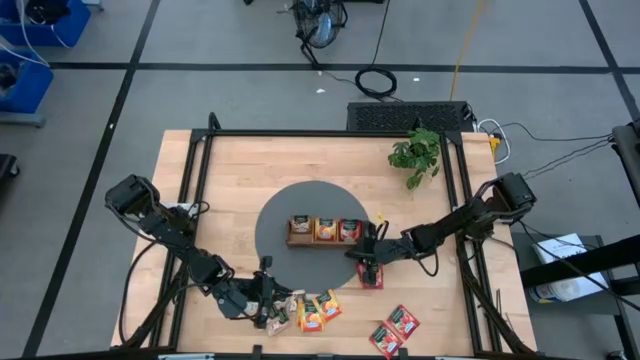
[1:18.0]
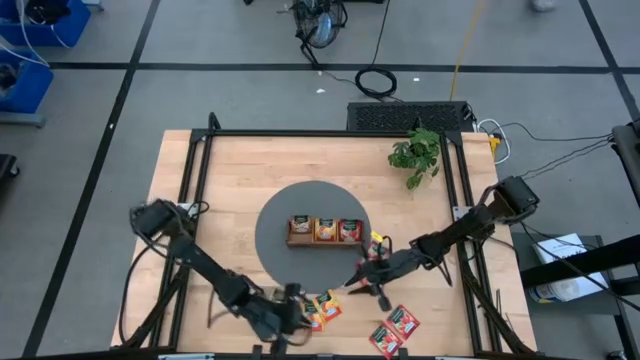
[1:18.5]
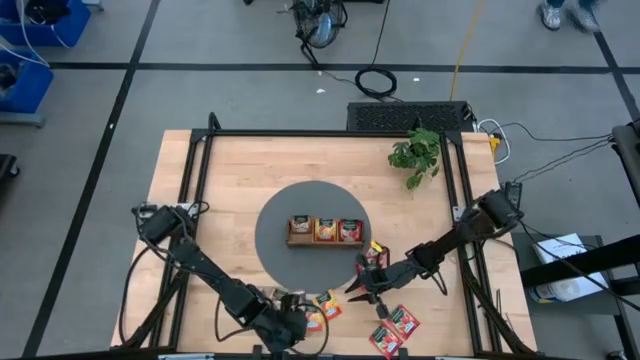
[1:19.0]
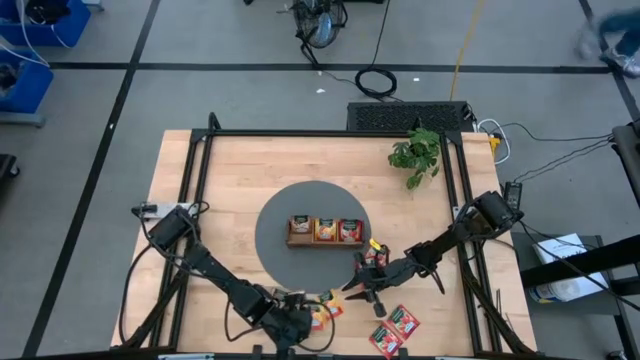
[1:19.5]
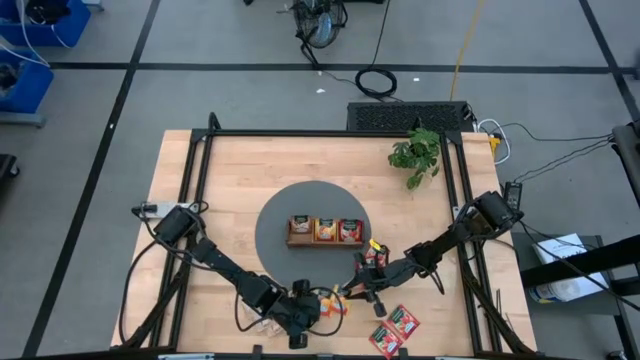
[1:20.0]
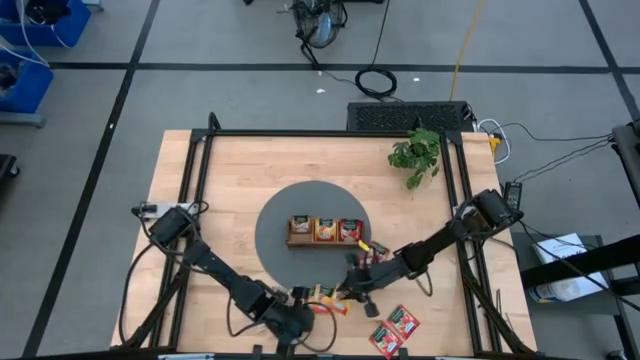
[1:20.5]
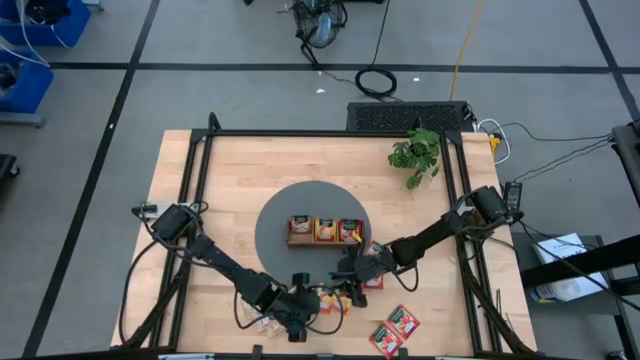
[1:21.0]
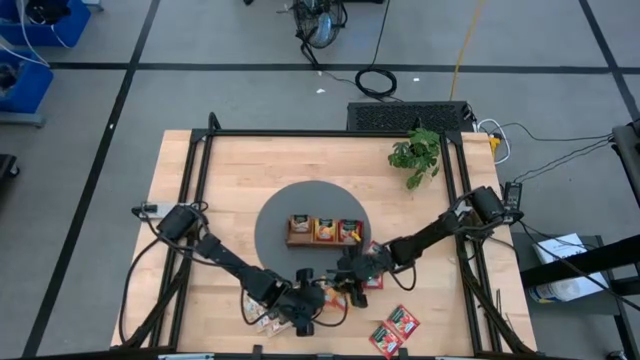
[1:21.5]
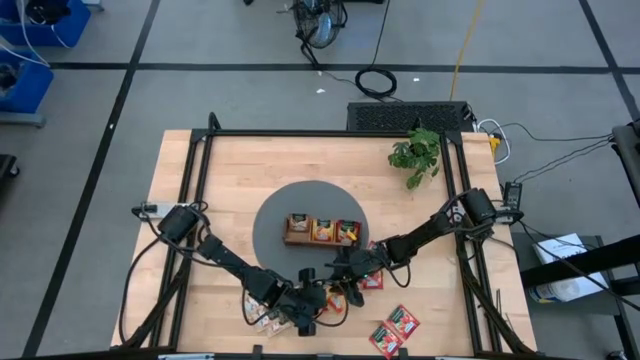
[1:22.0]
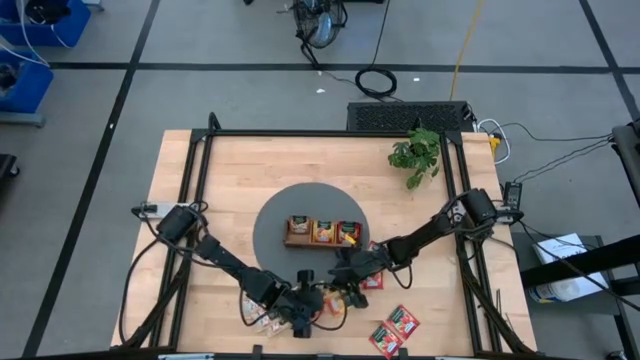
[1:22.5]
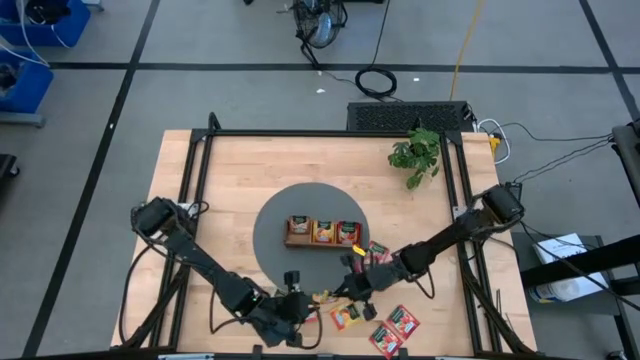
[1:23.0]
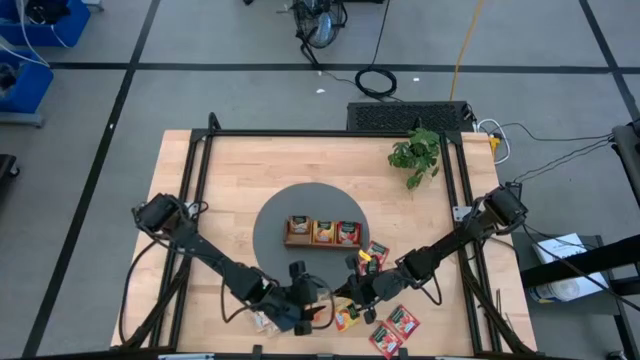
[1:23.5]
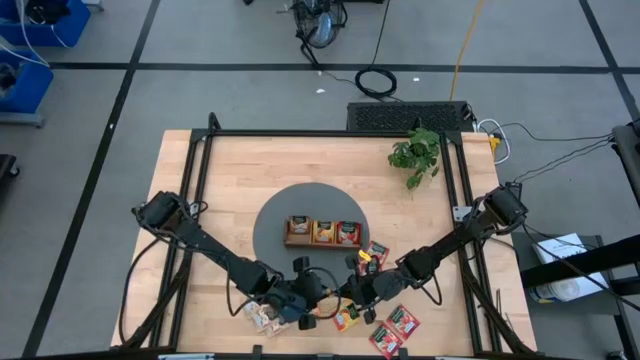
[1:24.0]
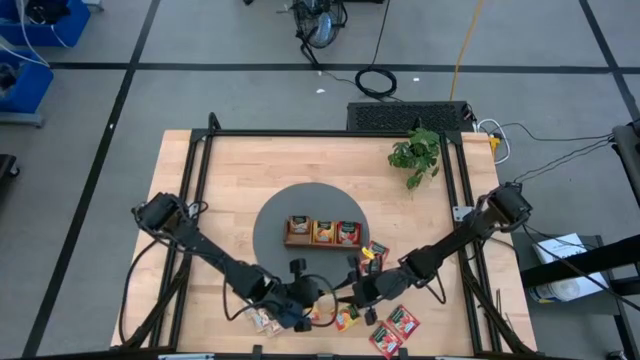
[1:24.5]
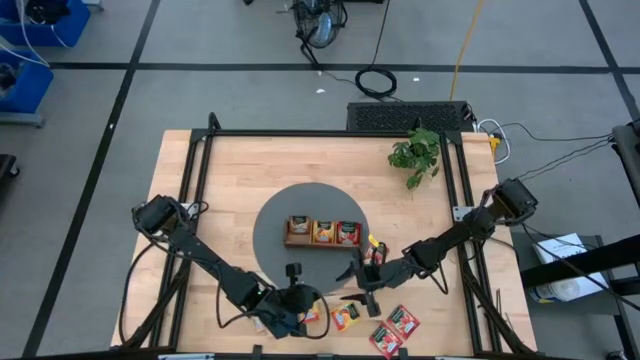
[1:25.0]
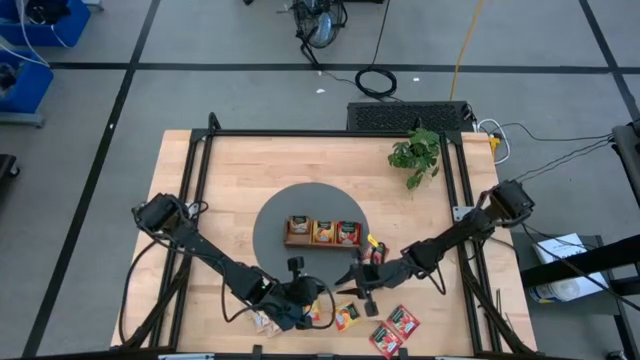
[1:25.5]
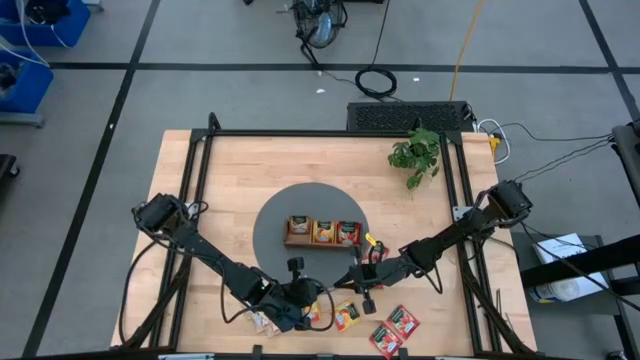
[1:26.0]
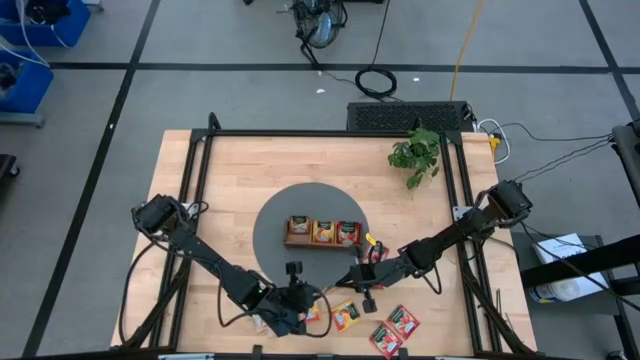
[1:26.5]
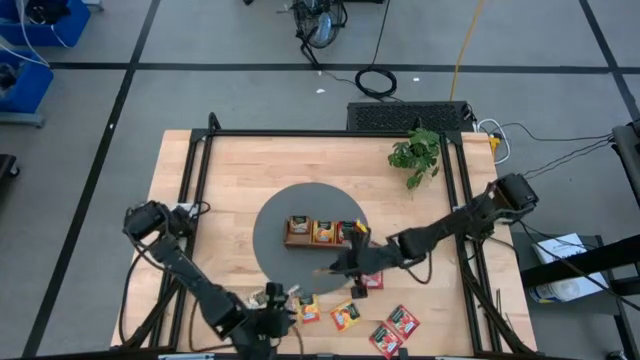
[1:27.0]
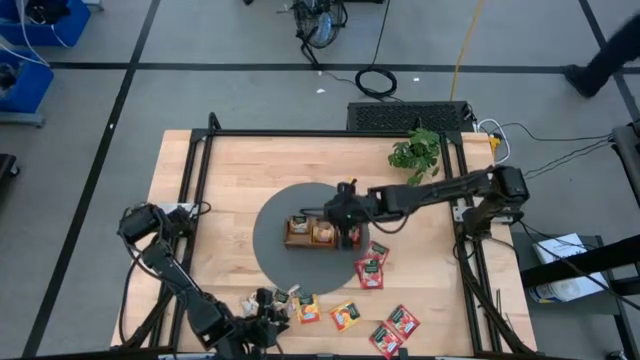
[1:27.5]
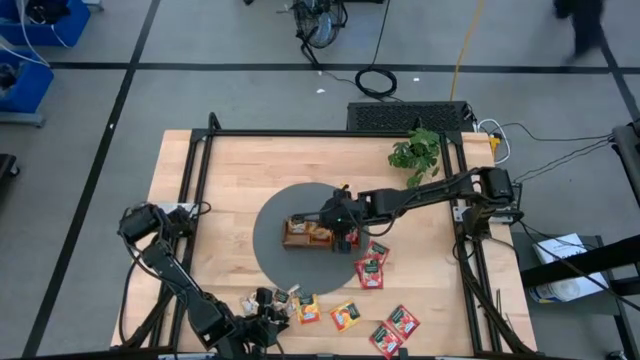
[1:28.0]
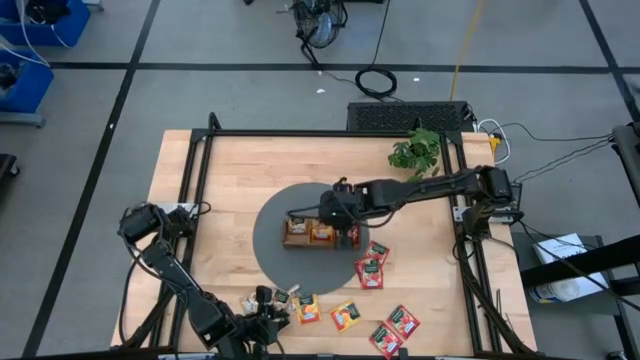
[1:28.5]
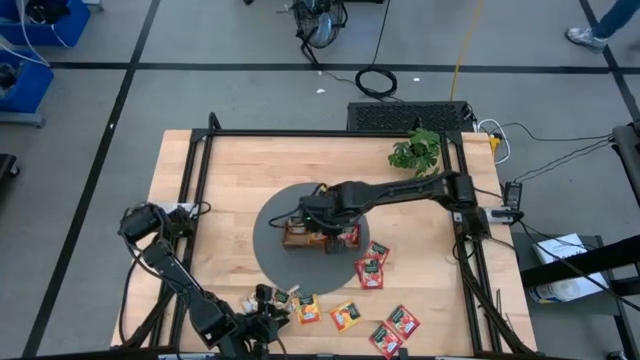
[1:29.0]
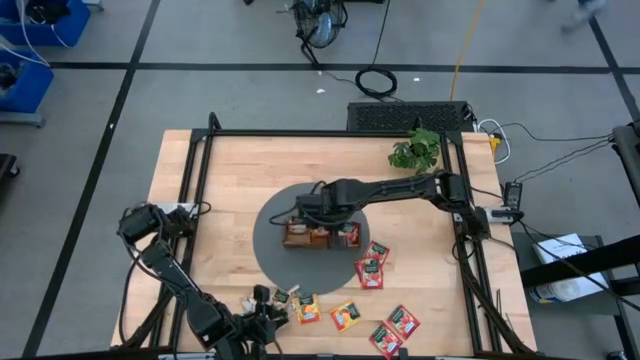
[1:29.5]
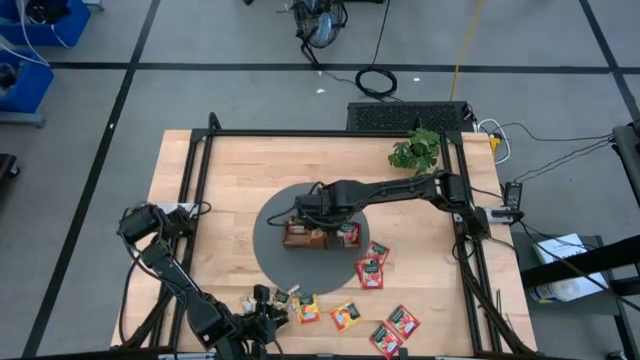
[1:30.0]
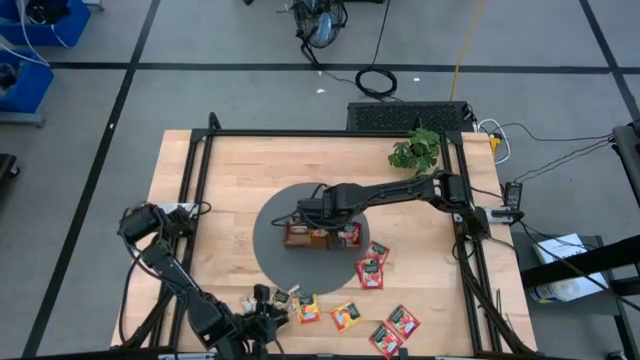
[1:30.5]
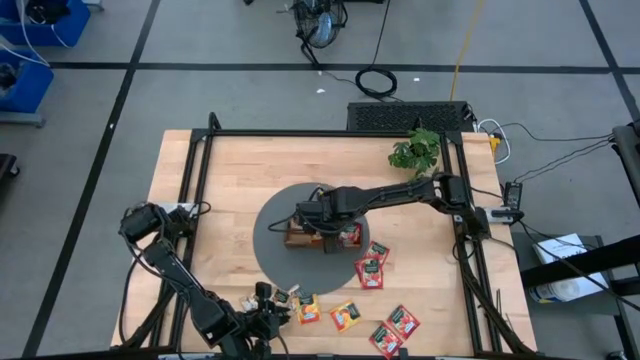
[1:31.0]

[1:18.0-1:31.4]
Task: Pick & Place Tea
Put the middle yellow tea sachet into the middle section of the wooden organizer

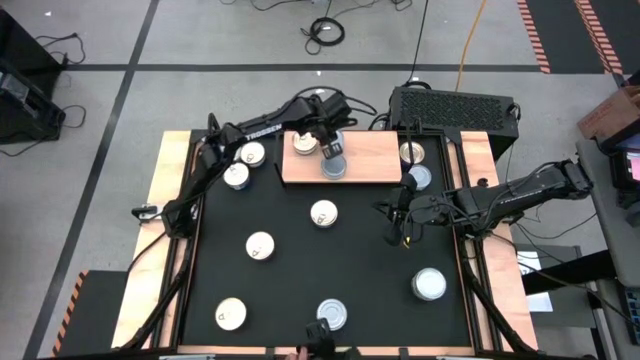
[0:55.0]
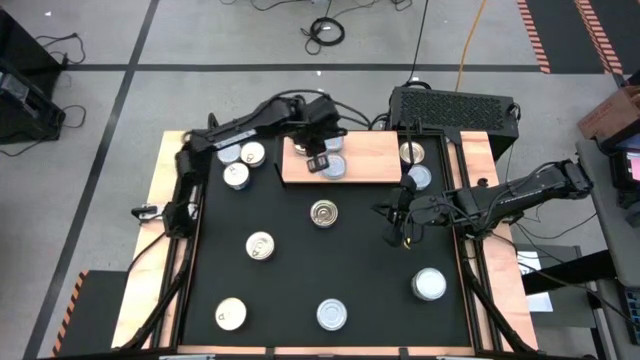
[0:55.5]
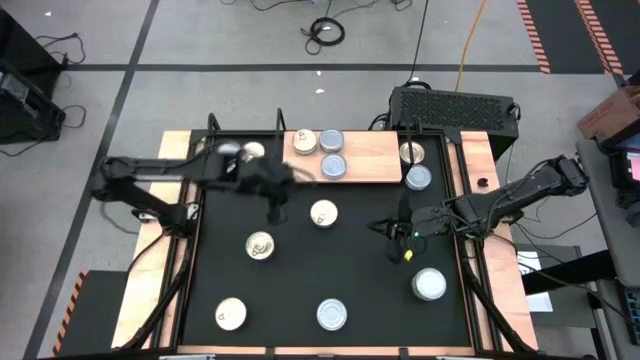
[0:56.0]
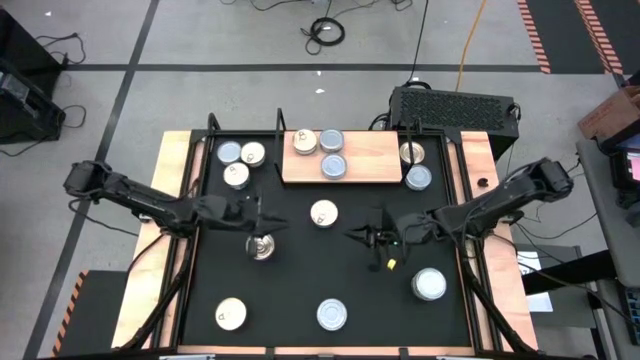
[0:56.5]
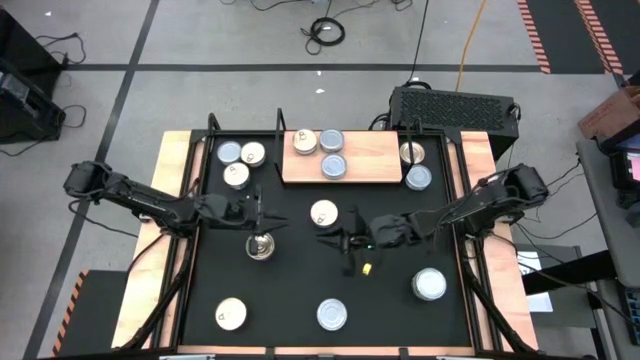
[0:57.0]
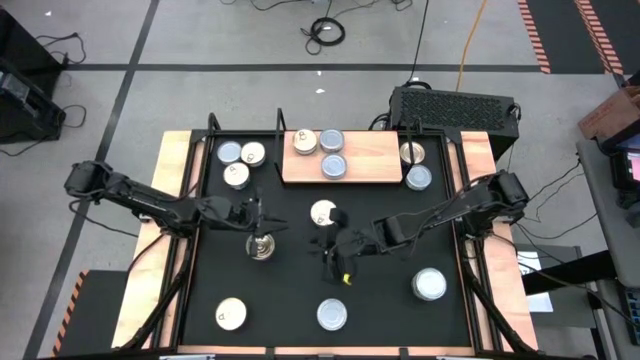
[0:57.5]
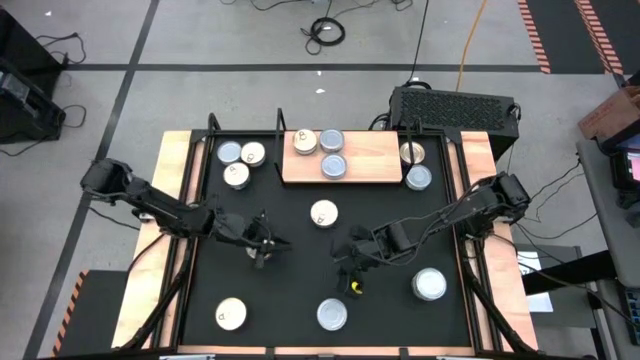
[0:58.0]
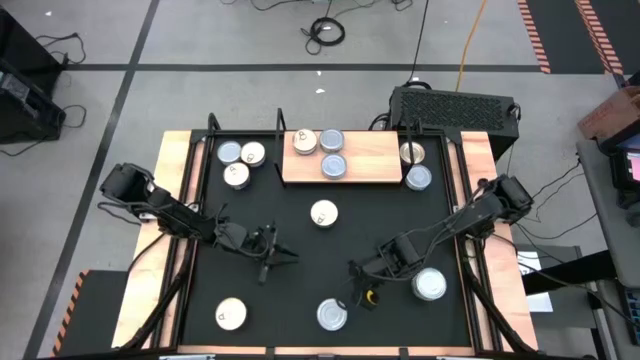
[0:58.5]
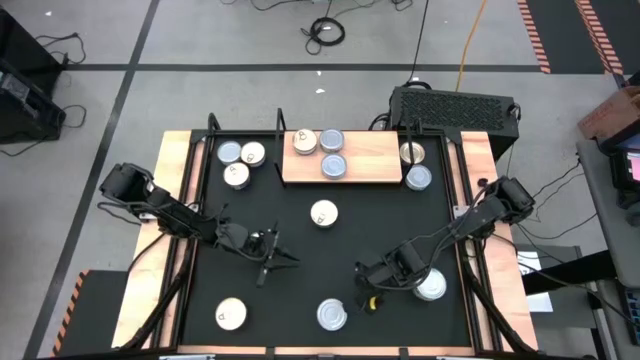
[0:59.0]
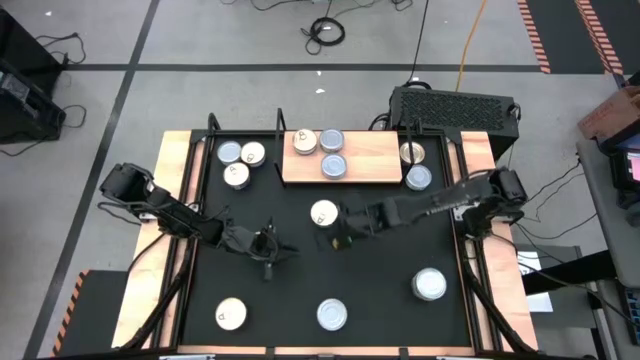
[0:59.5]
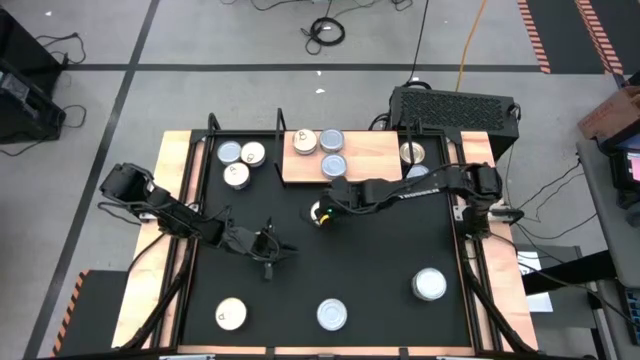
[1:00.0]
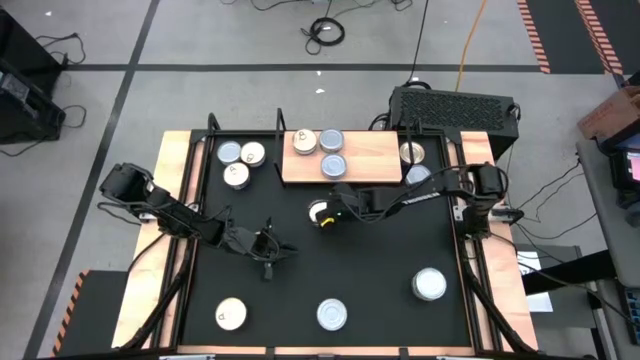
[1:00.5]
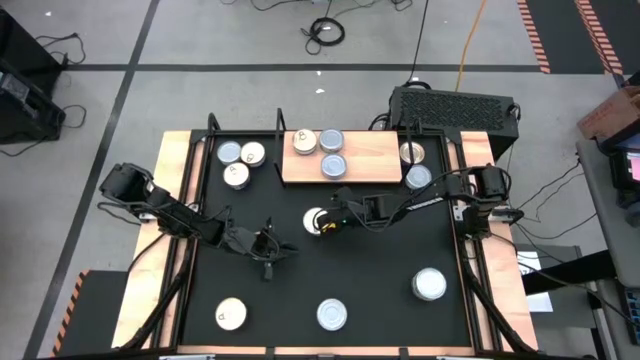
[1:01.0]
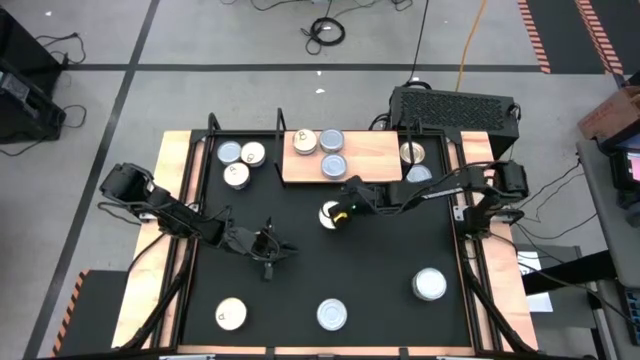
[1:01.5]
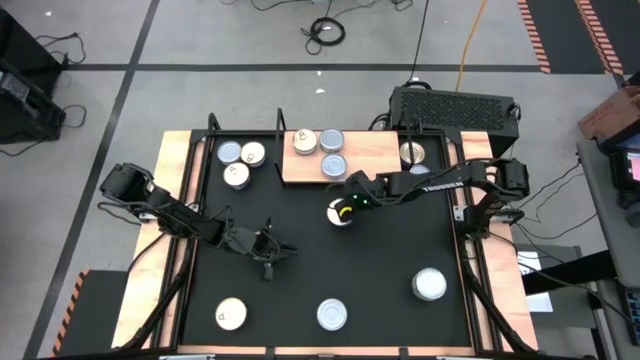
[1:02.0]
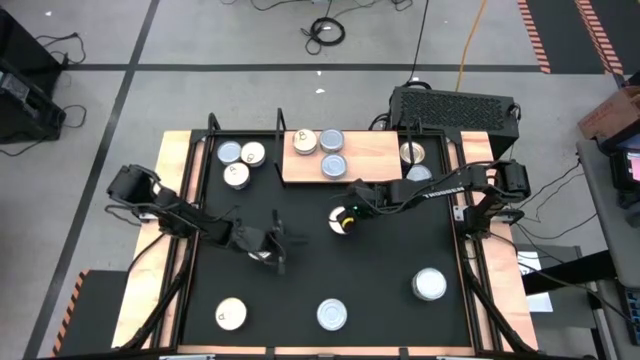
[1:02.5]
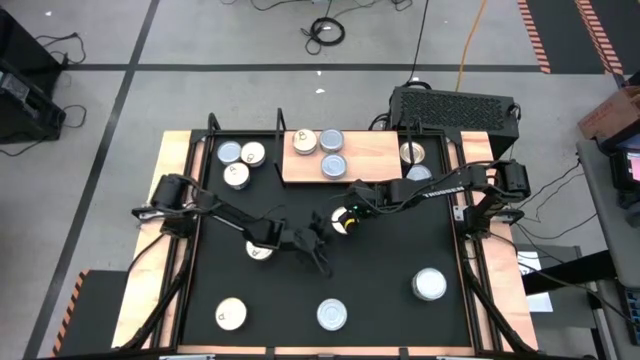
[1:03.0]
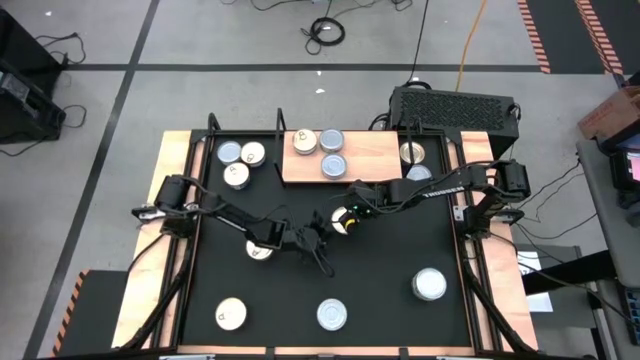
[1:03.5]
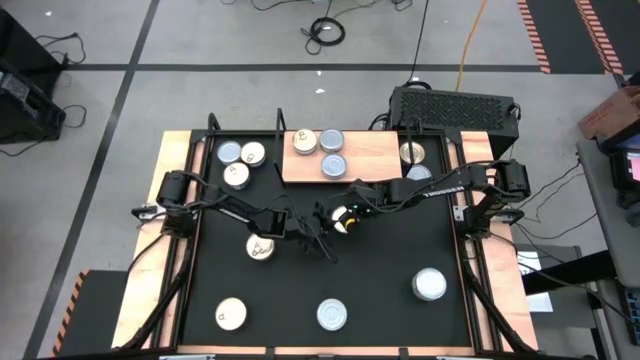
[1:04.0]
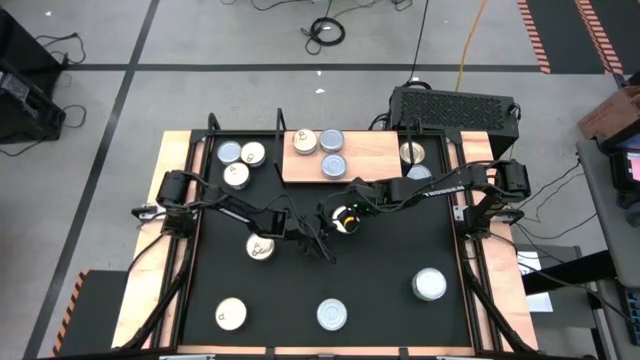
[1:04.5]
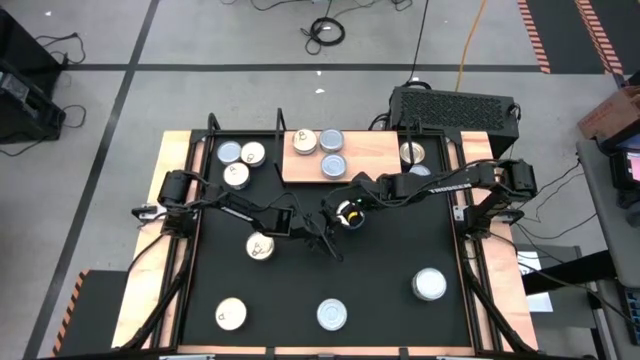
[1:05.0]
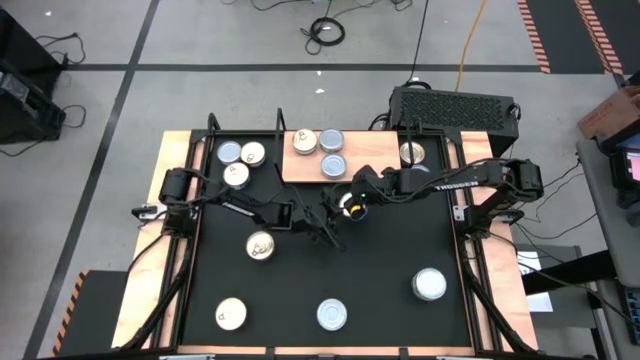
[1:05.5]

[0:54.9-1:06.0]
Task: Stack canned seafood by type on shelf
Put the center blue tuna can on the shelf
